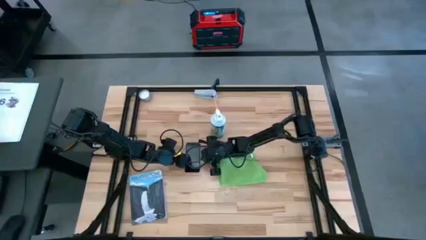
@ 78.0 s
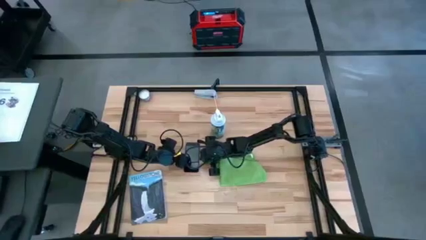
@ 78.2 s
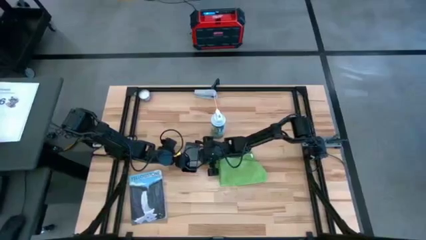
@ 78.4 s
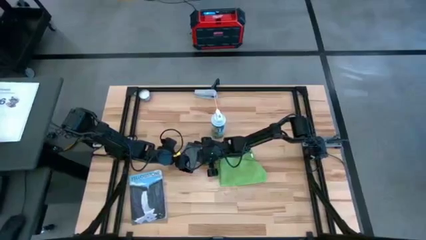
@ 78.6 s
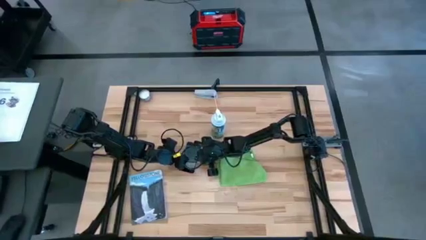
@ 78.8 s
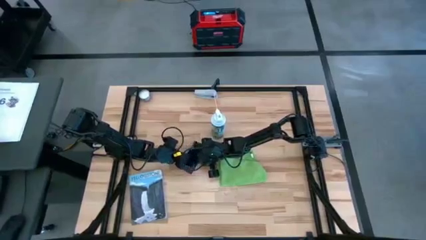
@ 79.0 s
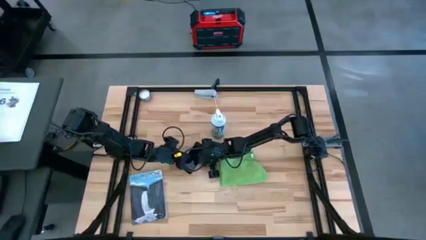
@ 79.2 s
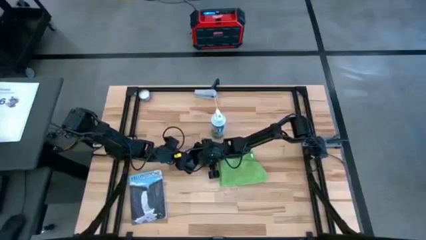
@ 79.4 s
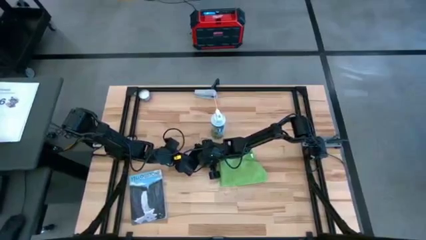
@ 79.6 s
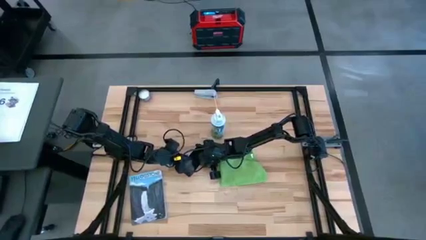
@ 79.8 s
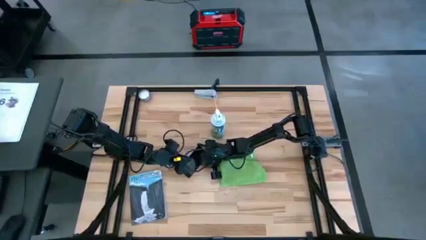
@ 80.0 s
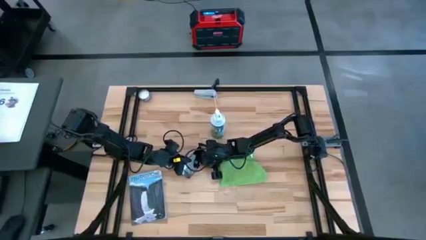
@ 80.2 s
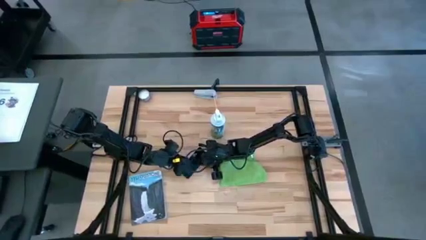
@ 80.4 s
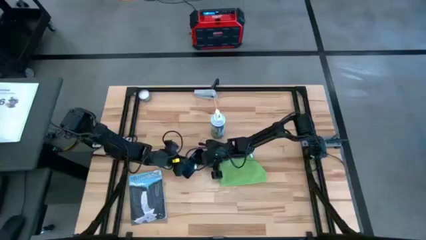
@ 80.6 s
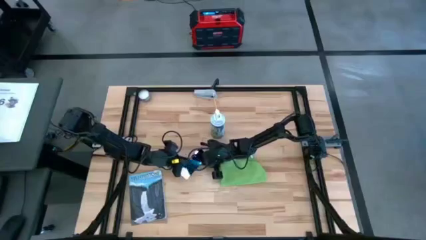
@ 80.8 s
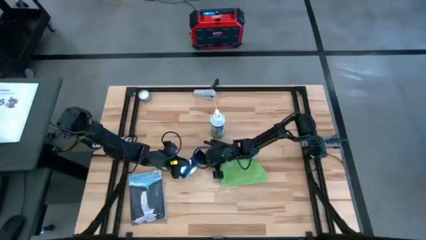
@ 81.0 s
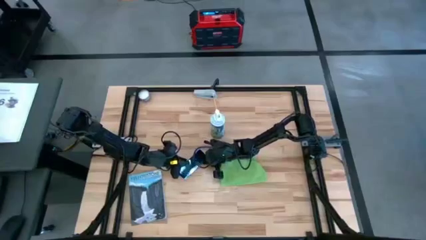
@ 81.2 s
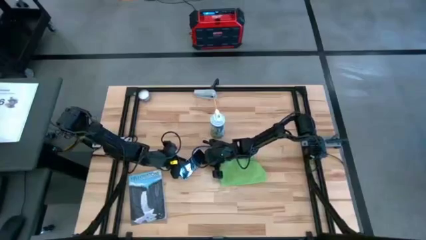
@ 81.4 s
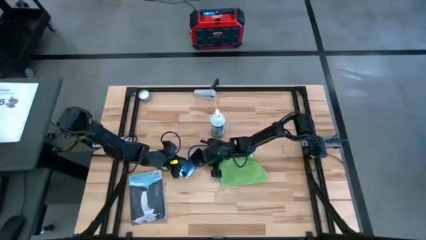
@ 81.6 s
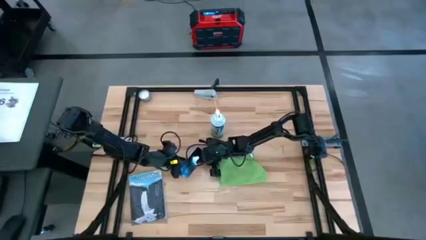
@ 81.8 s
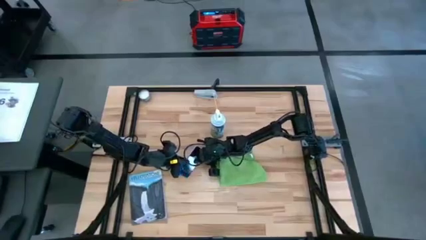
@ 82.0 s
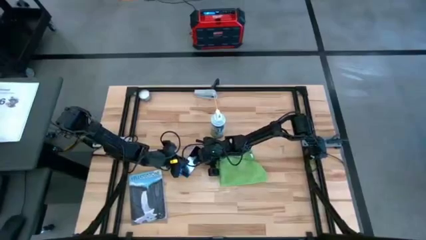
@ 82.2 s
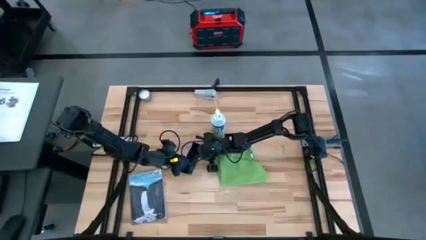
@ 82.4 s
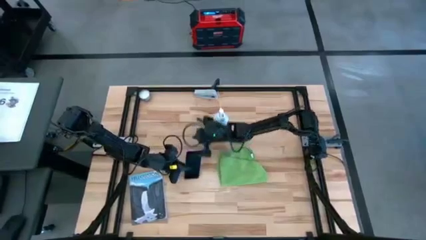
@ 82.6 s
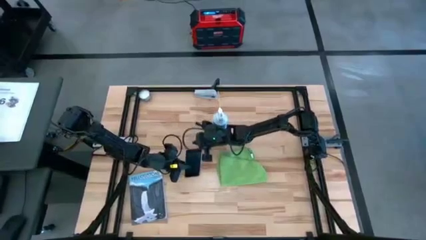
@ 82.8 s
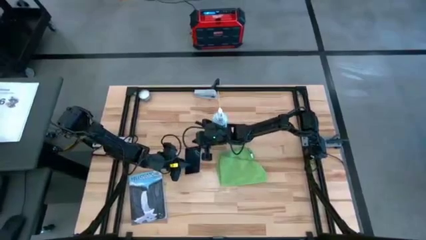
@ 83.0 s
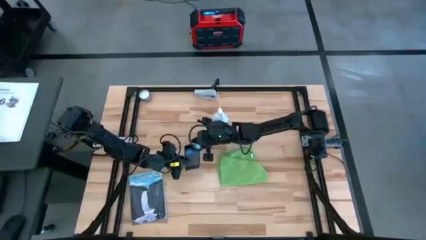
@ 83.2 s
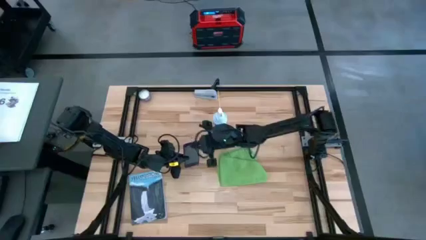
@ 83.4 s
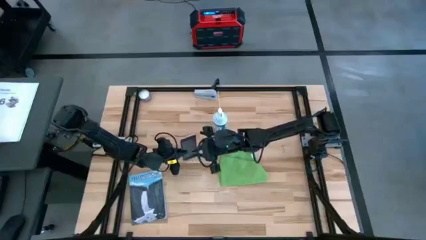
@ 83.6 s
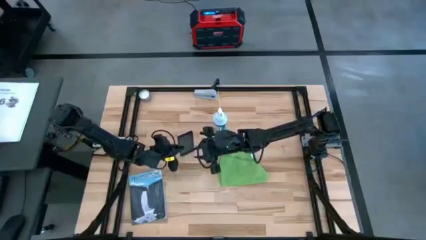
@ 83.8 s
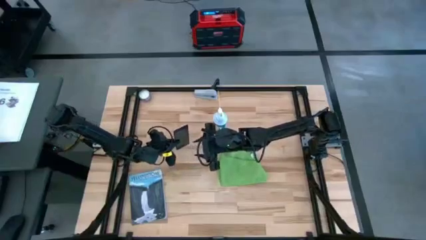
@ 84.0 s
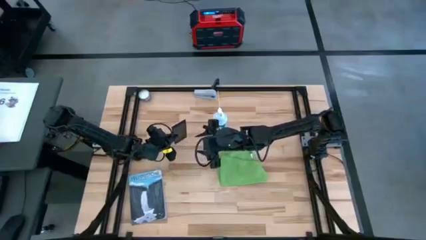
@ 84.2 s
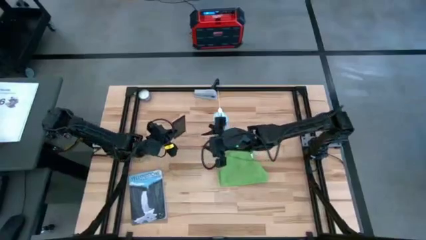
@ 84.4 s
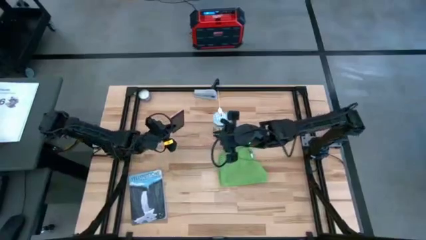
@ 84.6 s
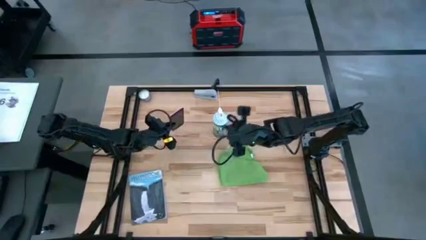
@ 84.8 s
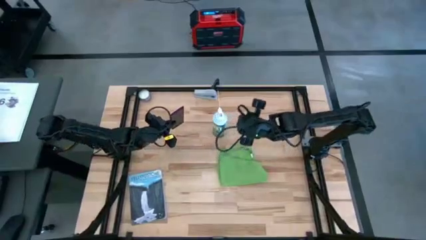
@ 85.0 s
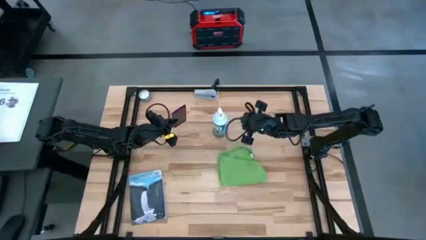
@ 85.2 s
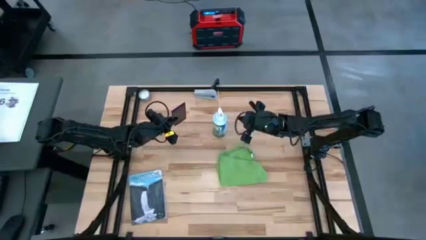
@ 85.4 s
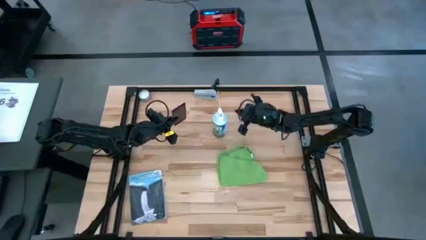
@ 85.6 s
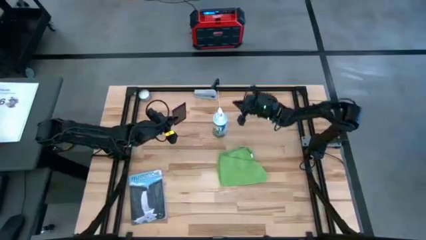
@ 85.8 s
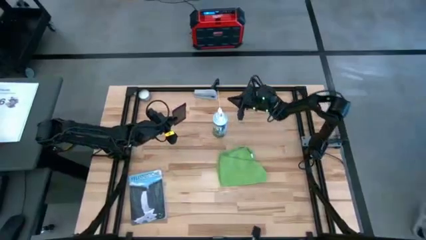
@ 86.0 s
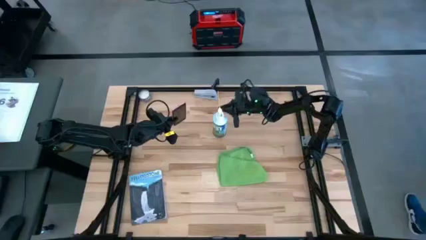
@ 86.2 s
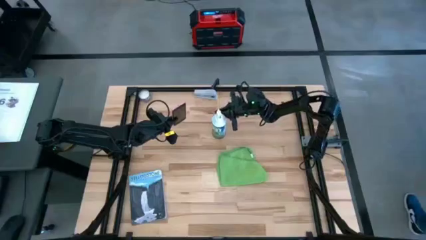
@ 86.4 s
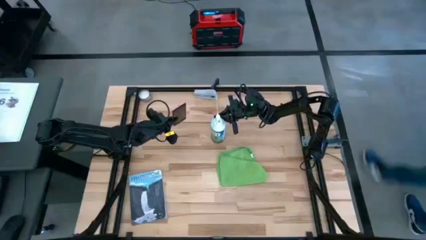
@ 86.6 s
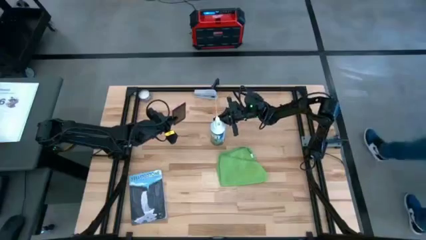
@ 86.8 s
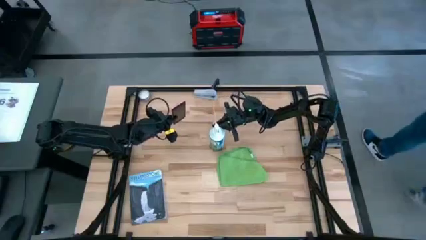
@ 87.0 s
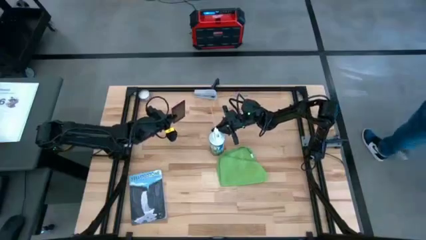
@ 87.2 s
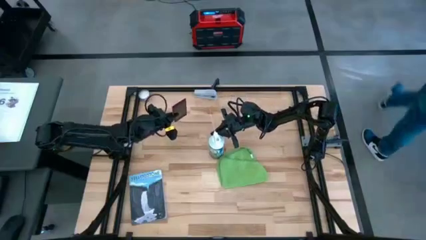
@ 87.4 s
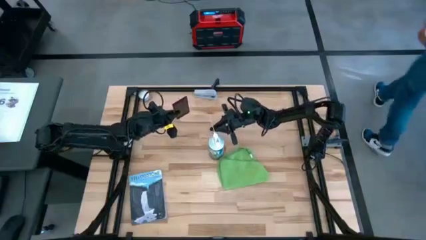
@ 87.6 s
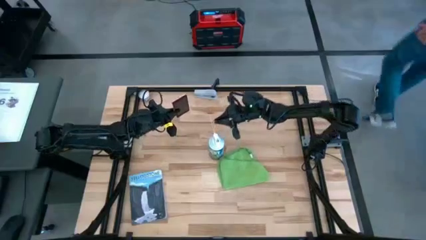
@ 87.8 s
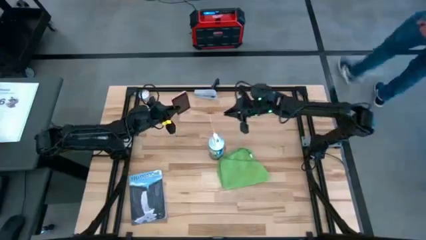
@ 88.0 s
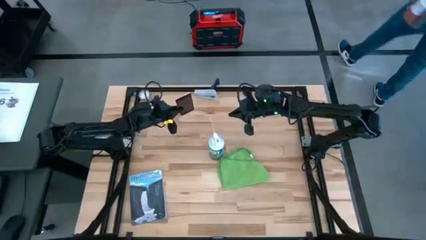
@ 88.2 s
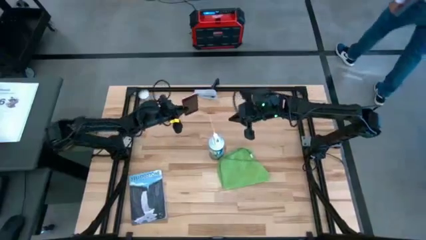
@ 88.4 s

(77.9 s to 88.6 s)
Task: Apply microfiber cloth
Spray the pink cellphone using the spray bottle

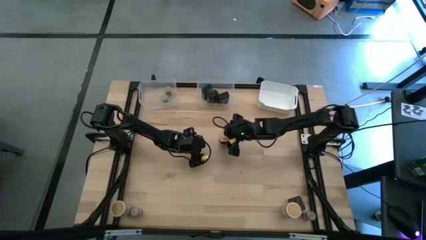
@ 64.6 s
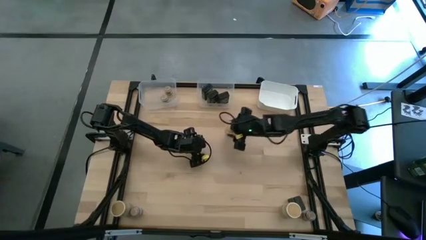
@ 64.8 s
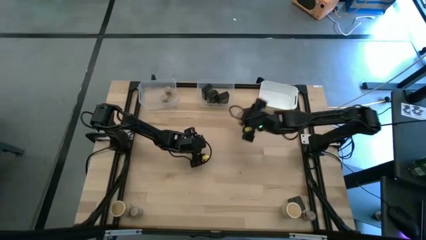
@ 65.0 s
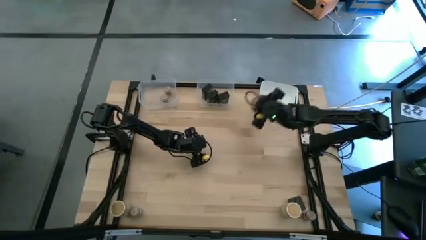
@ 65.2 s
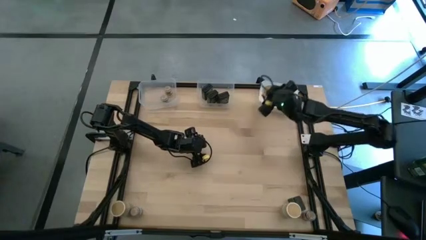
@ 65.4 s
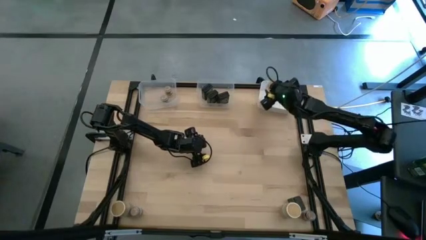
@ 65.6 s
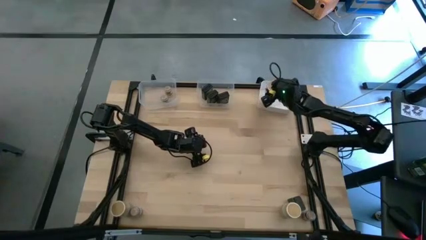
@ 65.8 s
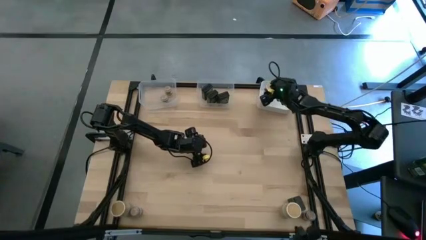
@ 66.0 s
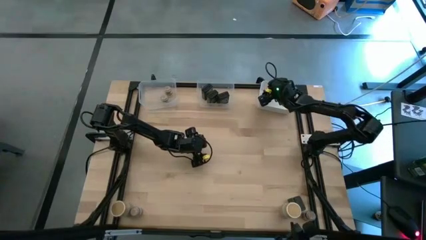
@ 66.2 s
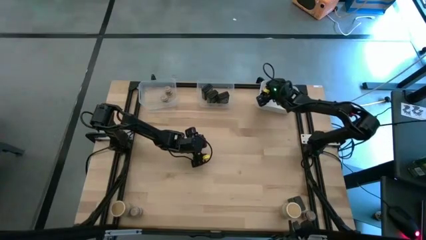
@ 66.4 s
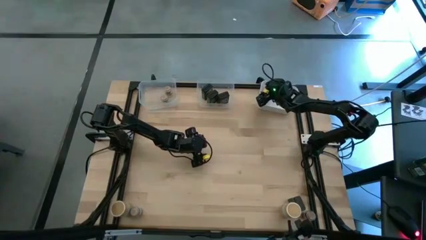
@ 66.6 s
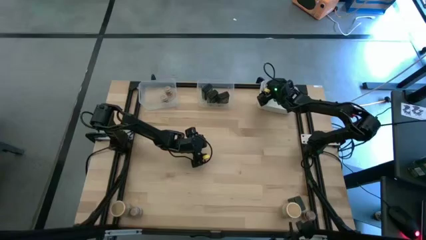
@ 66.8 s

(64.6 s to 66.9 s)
Task: Sort spices by type
Put the top left golden seasoning bottle into the right white bin
